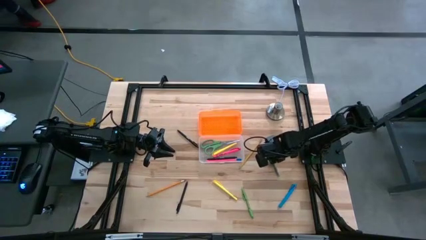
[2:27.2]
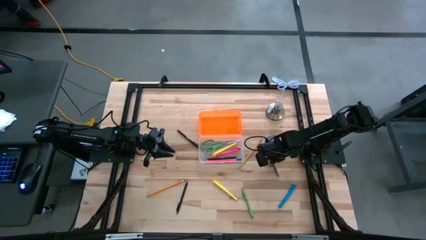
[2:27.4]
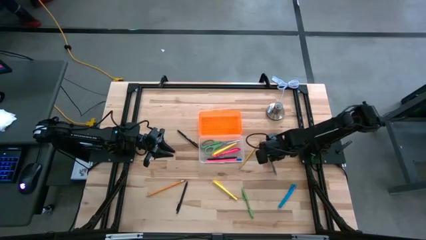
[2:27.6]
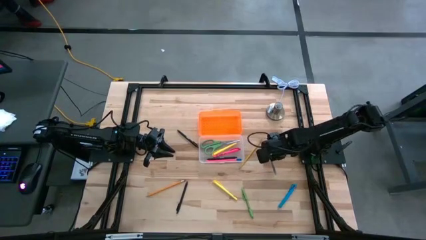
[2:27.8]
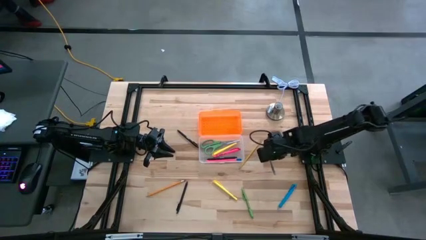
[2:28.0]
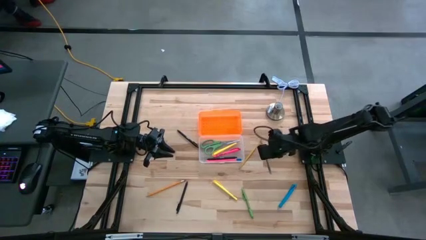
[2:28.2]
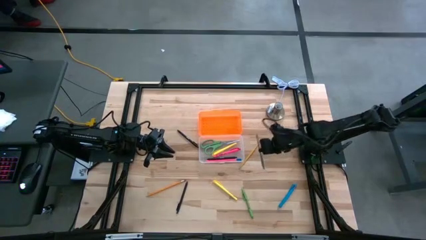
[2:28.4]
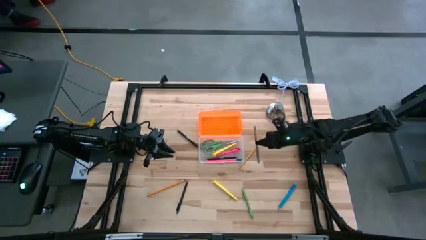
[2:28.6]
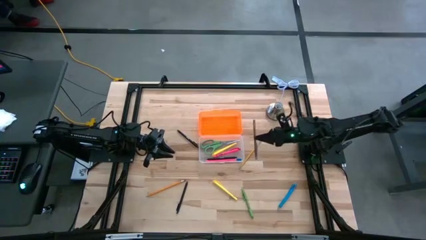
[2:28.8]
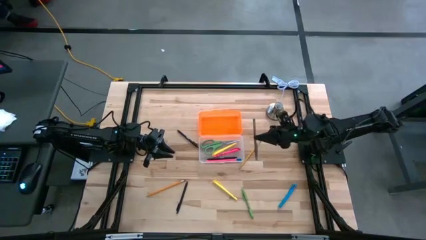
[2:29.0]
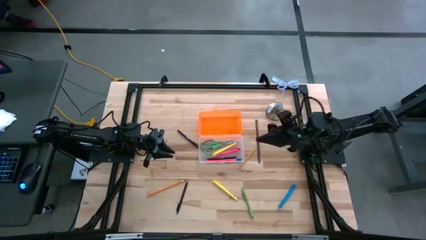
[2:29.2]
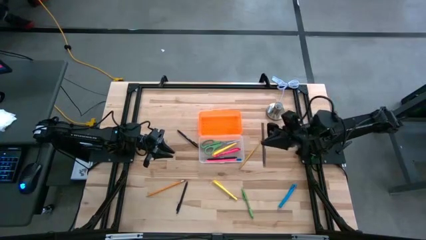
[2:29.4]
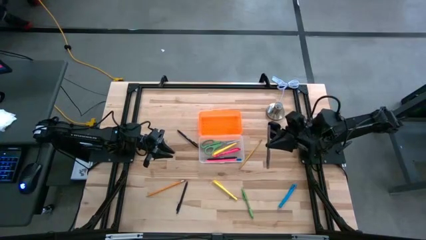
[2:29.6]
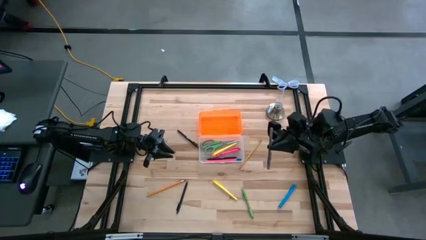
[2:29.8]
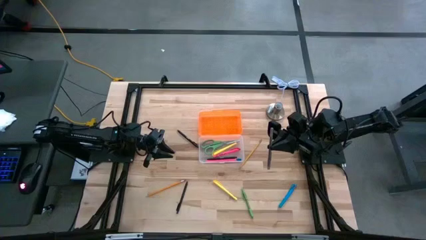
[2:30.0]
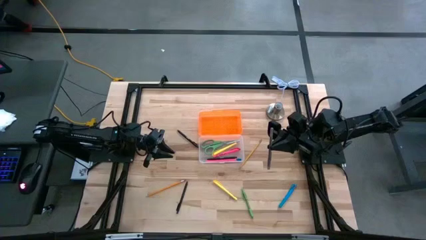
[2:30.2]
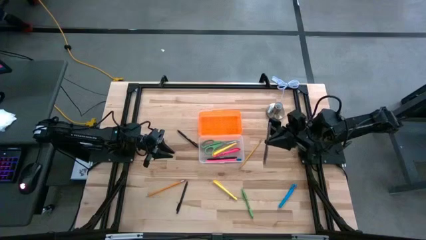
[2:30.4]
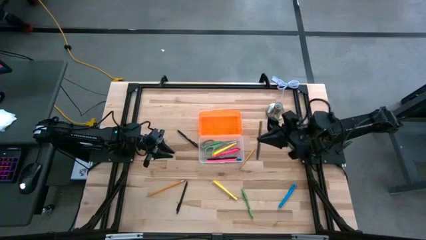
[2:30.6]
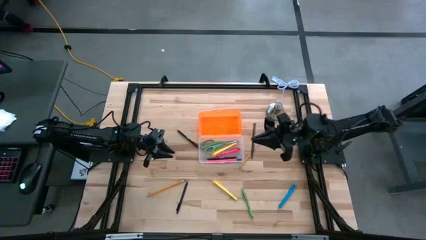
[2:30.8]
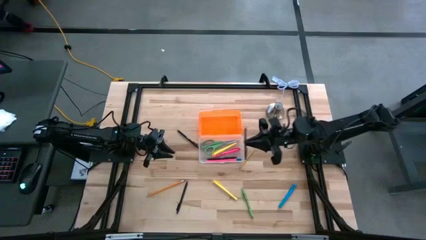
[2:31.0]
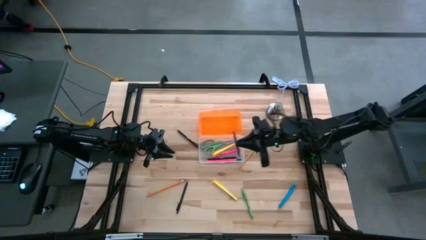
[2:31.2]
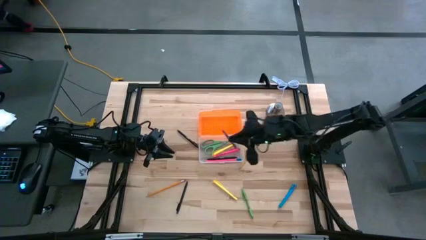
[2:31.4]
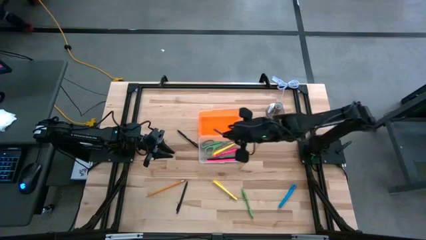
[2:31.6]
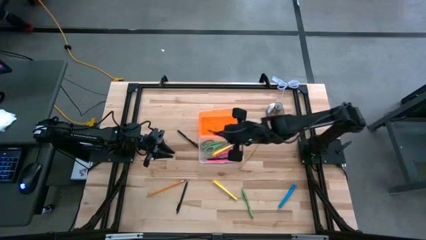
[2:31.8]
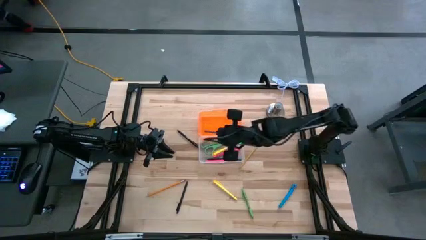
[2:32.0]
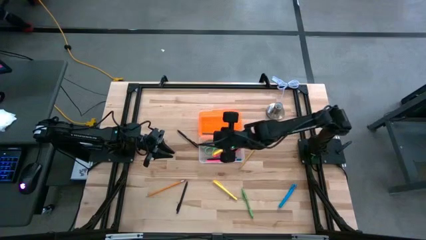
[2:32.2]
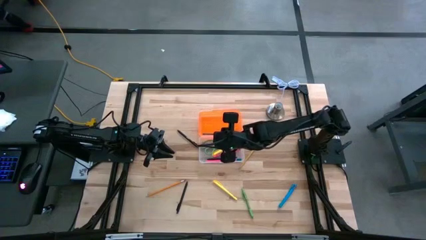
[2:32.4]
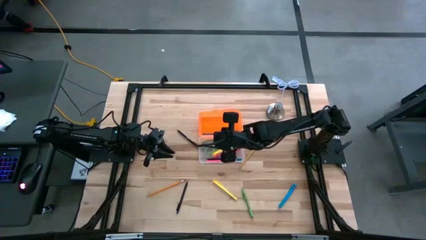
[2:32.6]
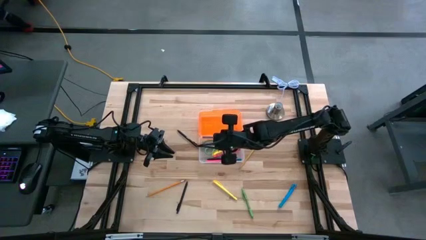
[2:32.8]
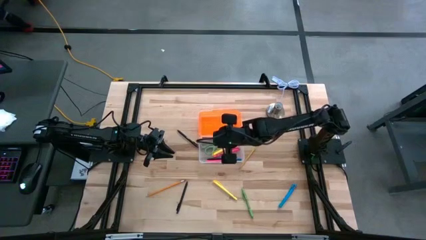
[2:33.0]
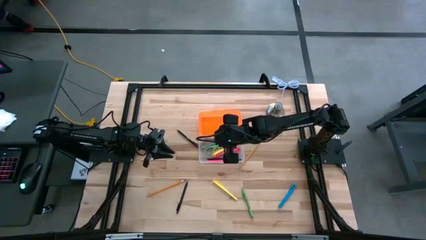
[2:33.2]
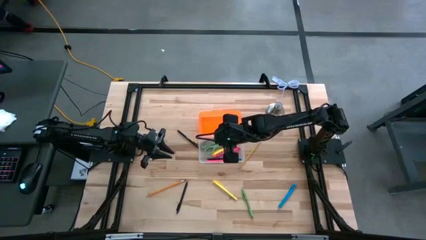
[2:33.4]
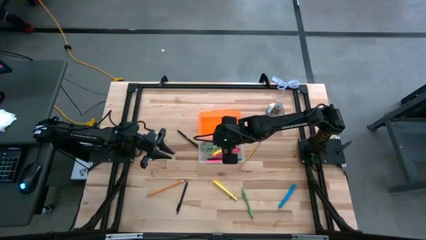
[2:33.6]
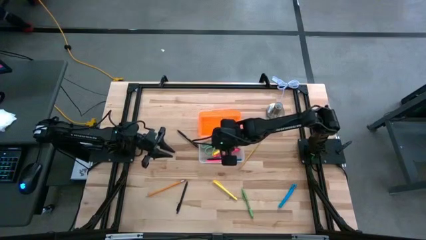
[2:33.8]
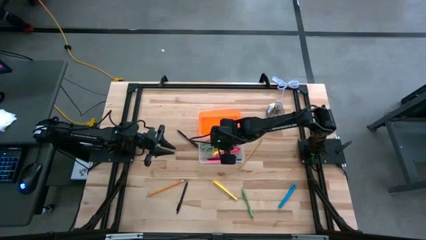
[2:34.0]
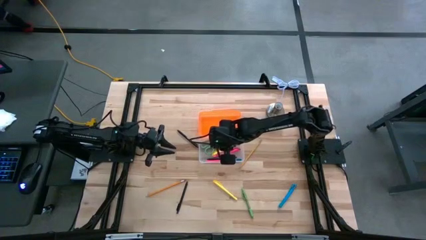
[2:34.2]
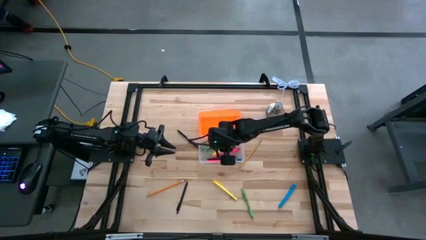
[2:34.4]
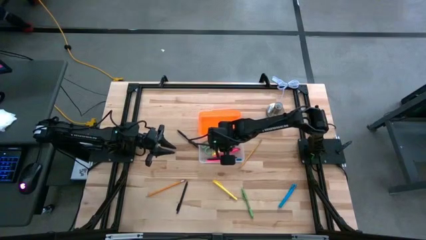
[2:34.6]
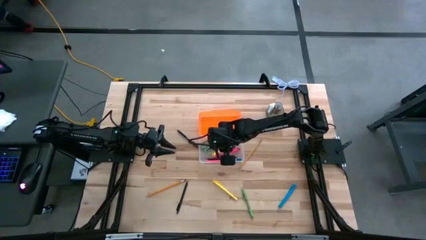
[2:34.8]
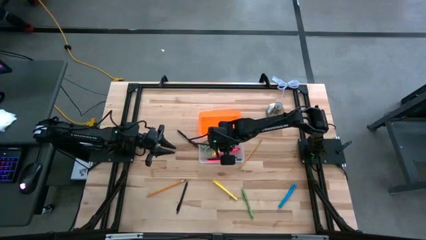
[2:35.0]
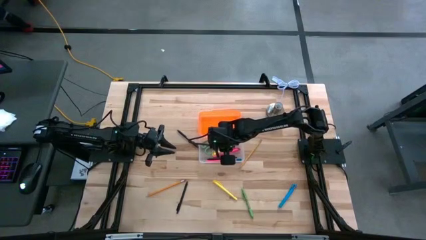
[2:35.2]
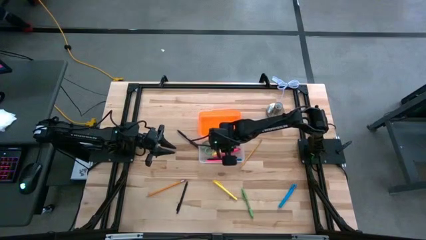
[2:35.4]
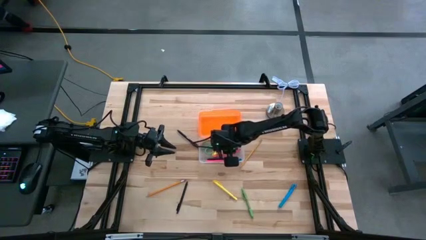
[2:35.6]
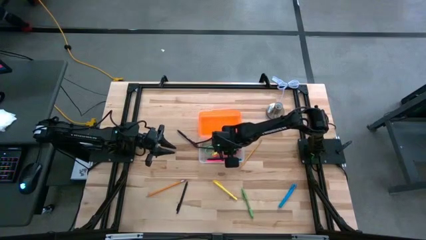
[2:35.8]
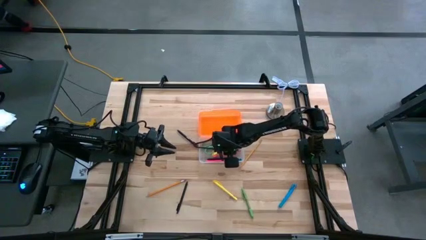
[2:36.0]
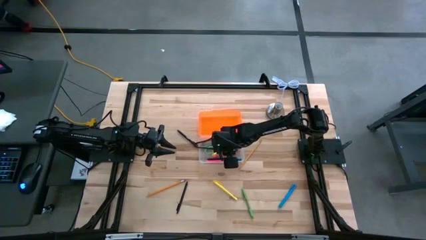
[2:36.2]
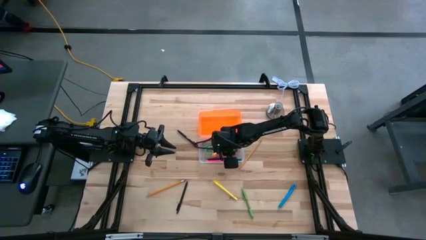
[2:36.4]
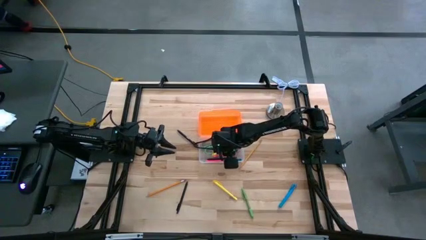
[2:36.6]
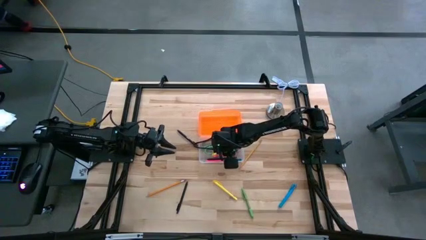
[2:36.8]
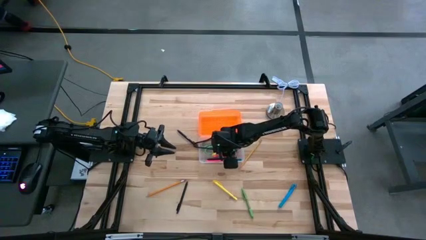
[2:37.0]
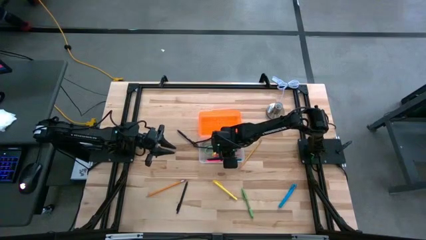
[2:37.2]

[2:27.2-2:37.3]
Task: Pick & place school supplies into a supply box
Put the gray pen into the container

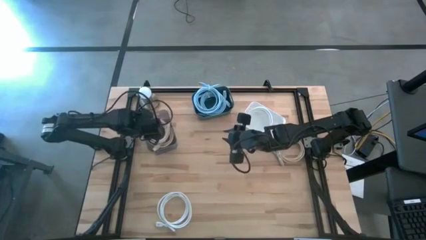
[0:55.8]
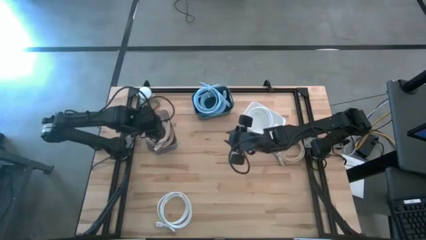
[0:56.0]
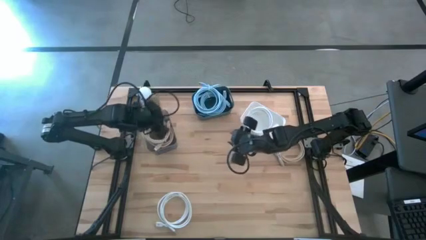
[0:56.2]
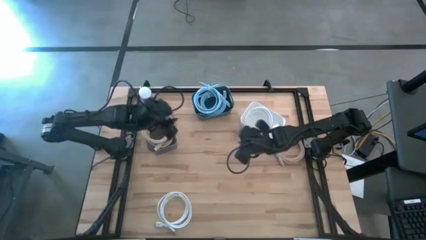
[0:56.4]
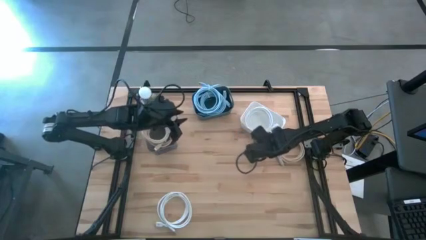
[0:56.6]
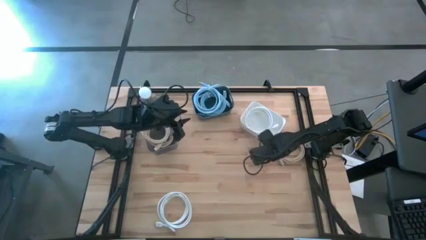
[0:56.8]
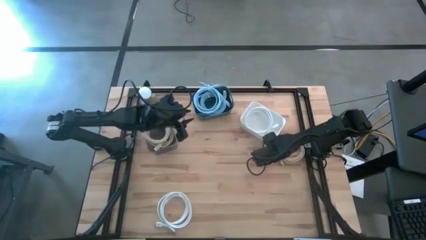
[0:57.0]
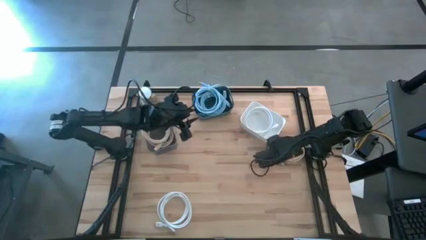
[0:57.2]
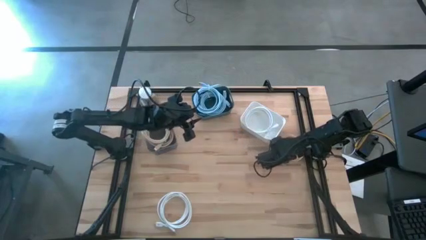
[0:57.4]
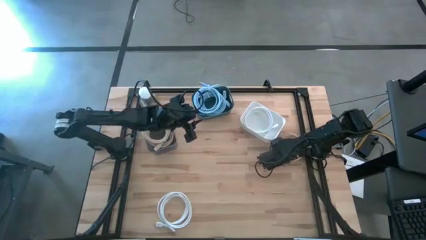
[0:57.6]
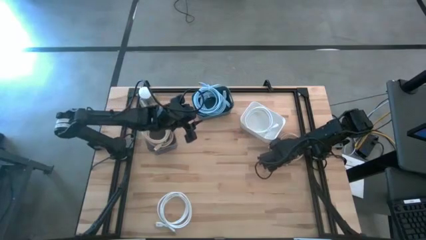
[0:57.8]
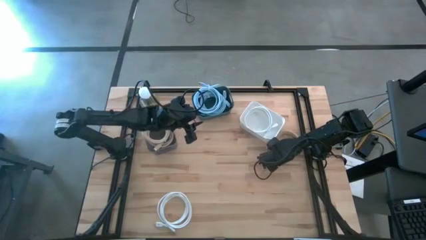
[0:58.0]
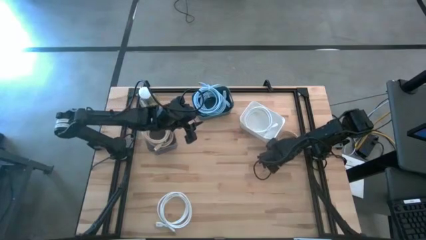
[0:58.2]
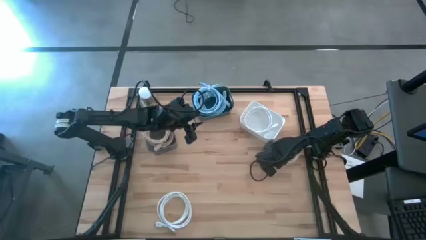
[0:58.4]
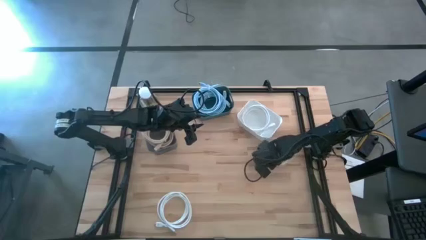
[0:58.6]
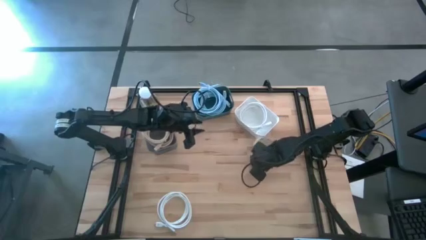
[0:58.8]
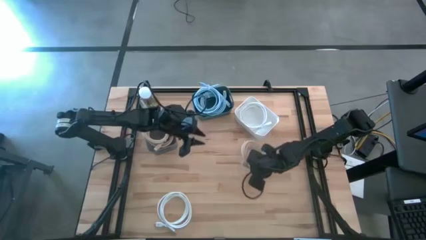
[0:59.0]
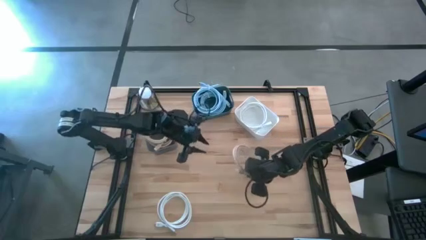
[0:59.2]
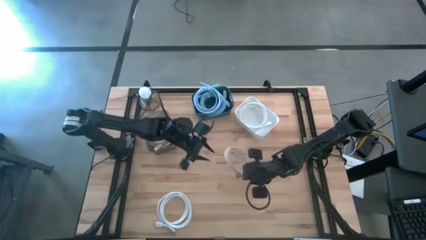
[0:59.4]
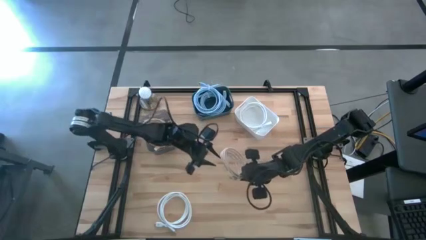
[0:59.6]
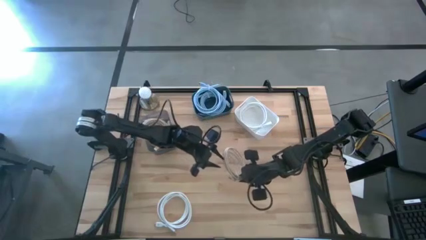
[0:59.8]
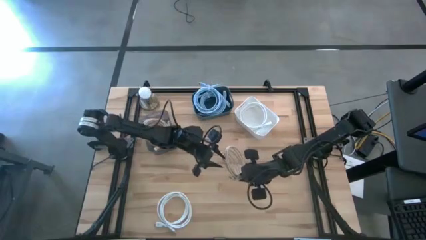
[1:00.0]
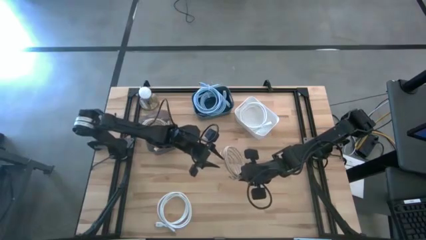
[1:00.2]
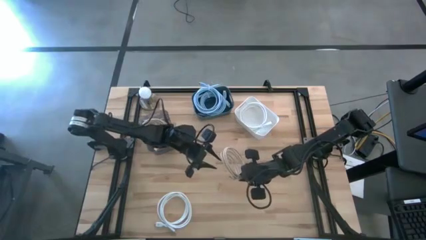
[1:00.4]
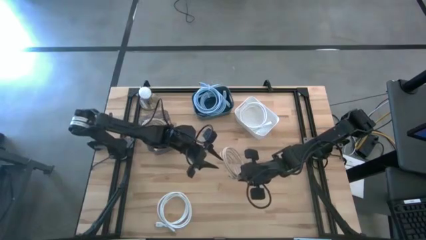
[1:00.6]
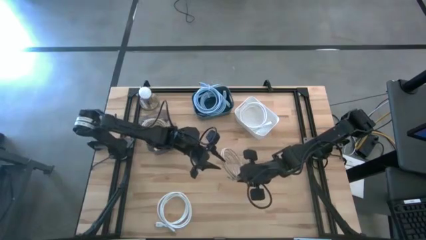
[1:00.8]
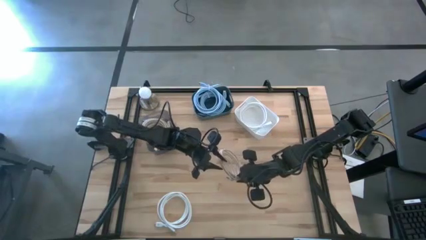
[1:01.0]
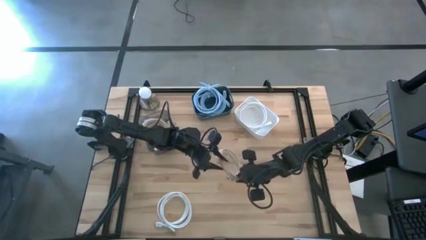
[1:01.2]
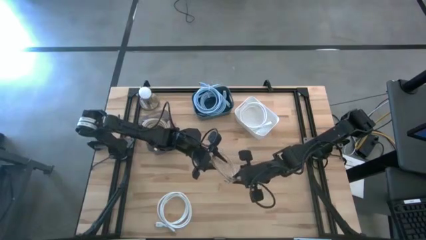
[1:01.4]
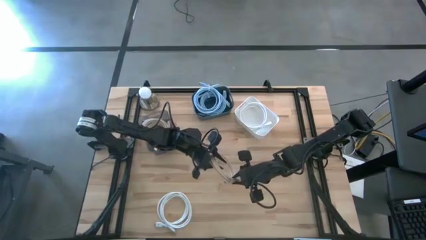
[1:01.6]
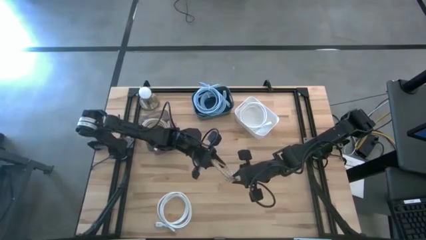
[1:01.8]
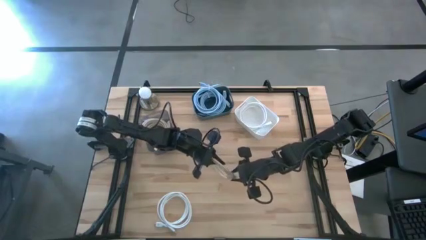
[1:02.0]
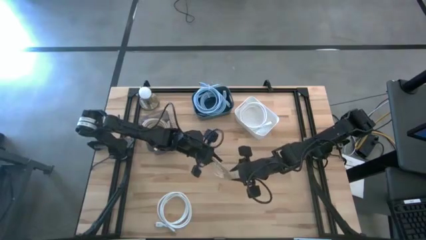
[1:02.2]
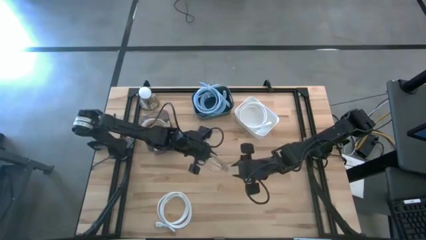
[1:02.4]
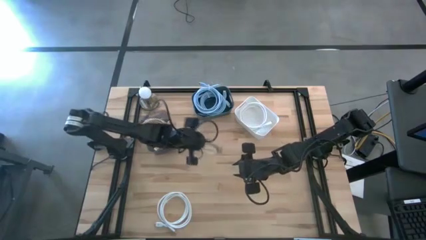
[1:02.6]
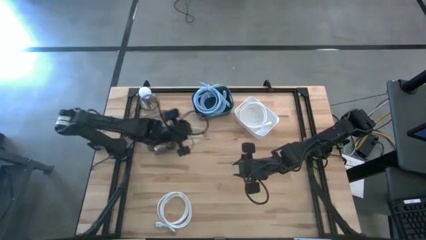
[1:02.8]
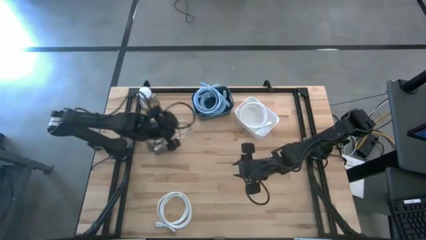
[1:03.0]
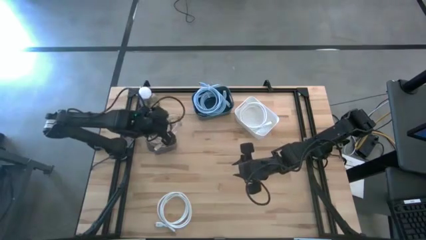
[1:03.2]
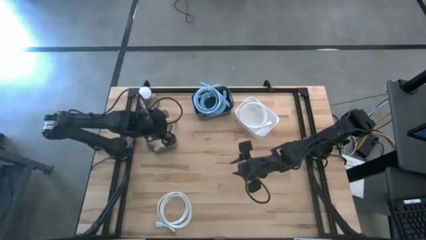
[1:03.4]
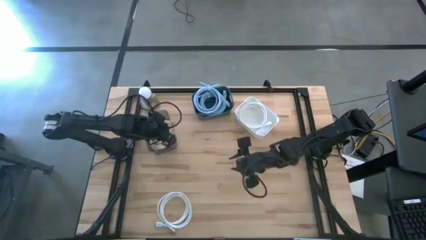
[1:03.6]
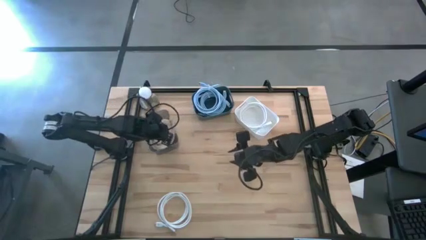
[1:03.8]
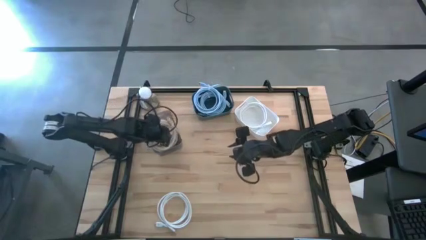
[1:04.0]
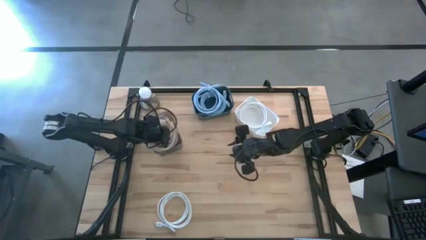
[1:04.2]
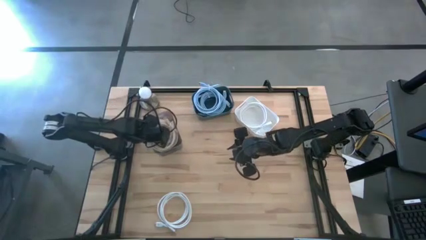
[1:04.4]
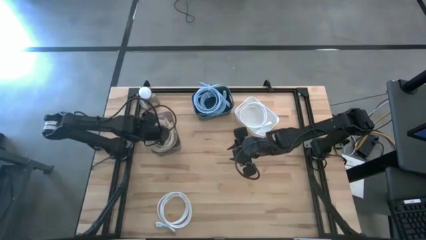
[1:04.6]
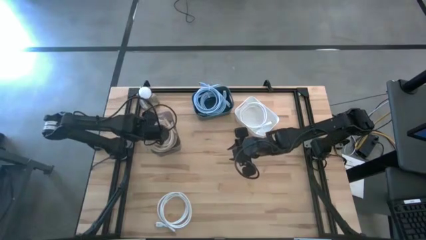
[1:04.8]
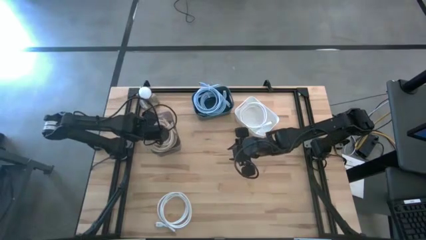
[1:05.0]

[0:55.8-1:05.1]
Task: Sort HDMI cables
Put the brown HDMI cable into the black bin
